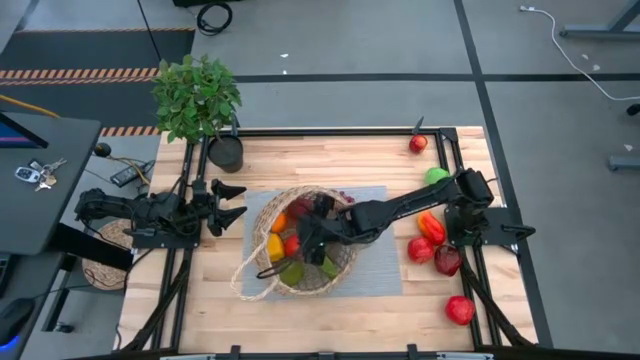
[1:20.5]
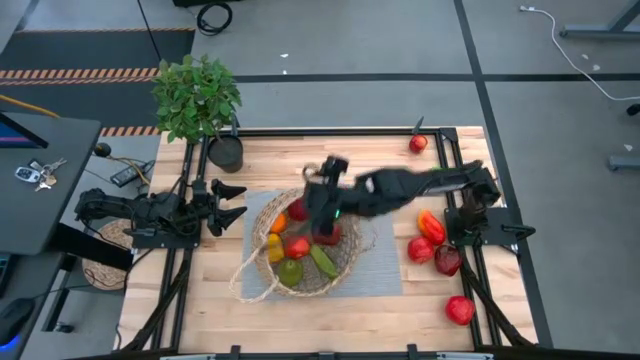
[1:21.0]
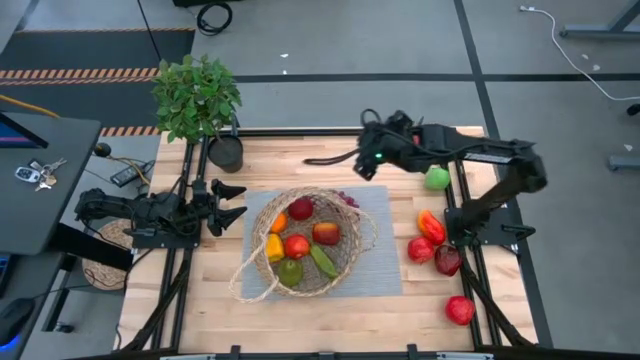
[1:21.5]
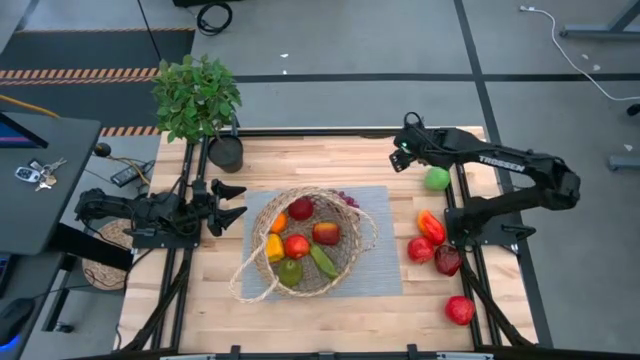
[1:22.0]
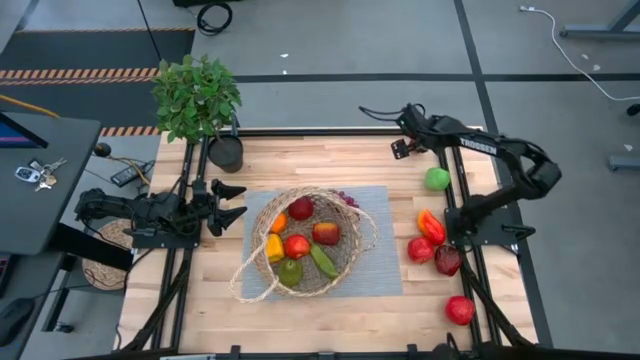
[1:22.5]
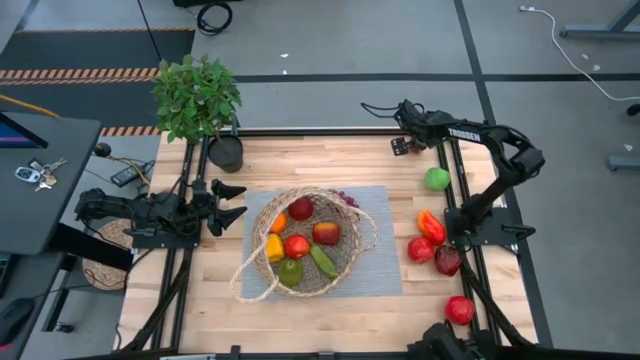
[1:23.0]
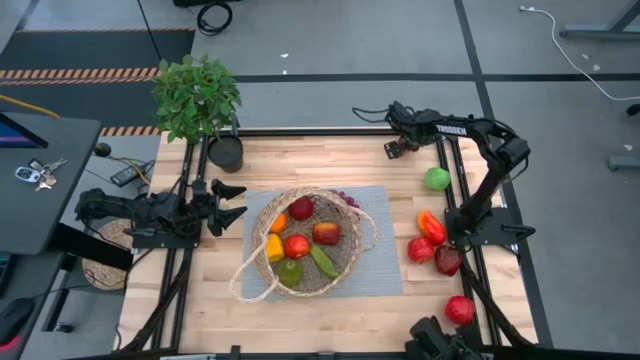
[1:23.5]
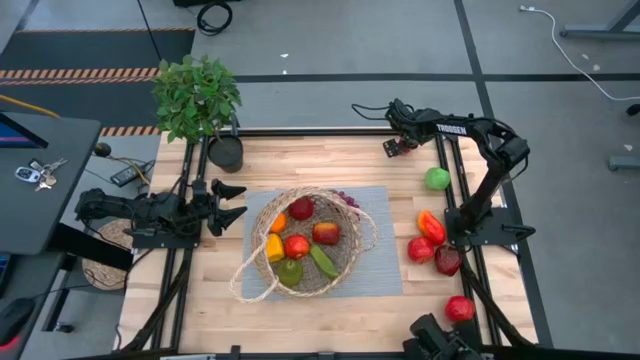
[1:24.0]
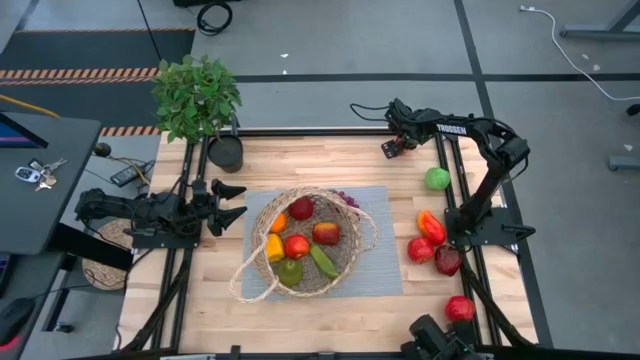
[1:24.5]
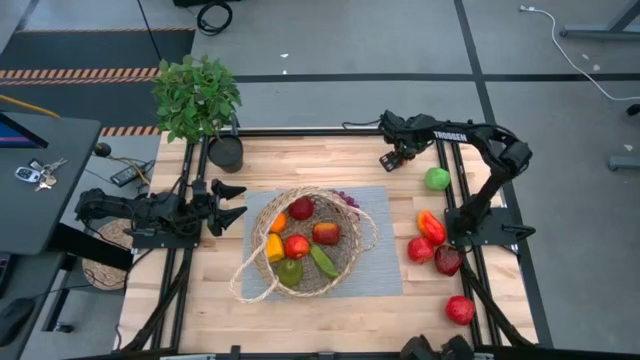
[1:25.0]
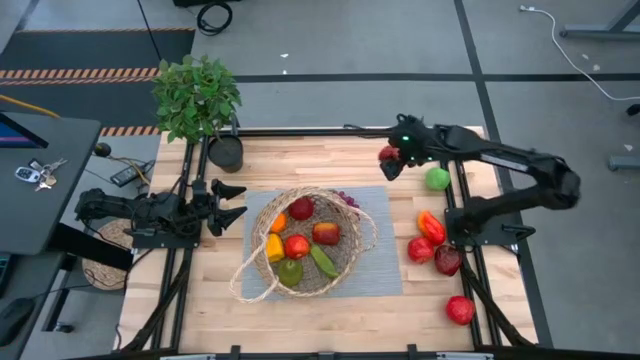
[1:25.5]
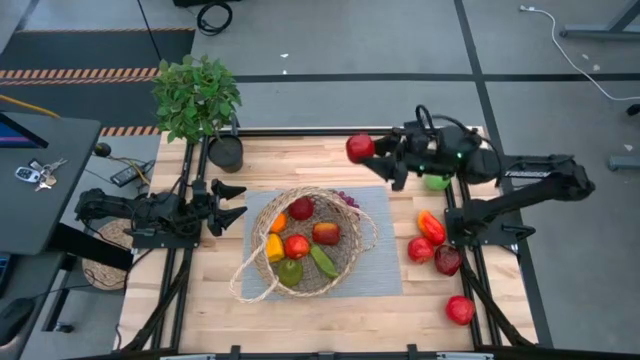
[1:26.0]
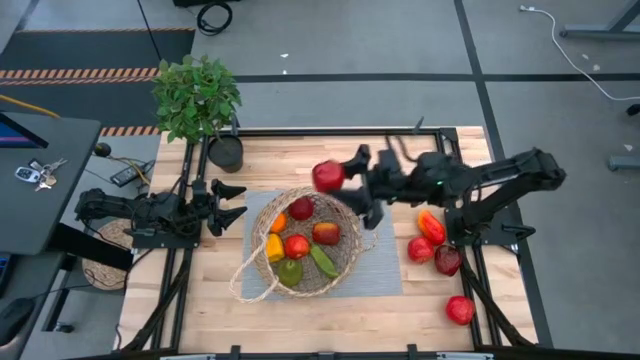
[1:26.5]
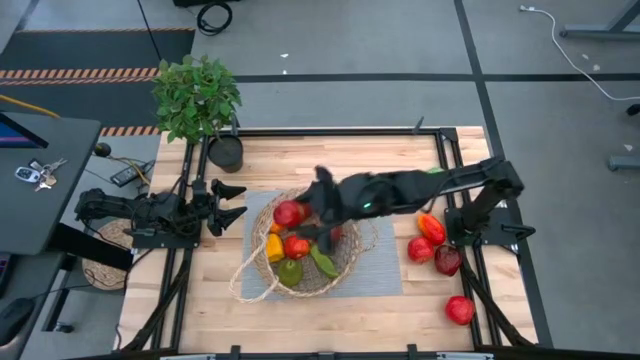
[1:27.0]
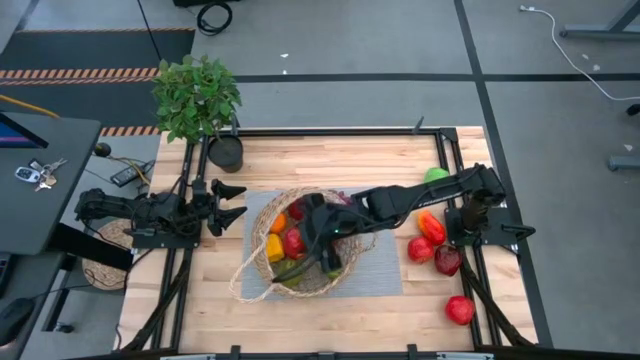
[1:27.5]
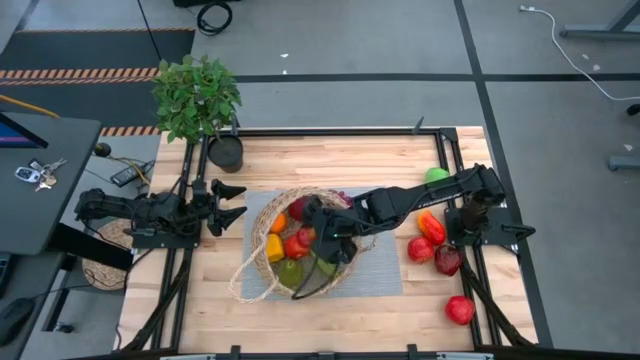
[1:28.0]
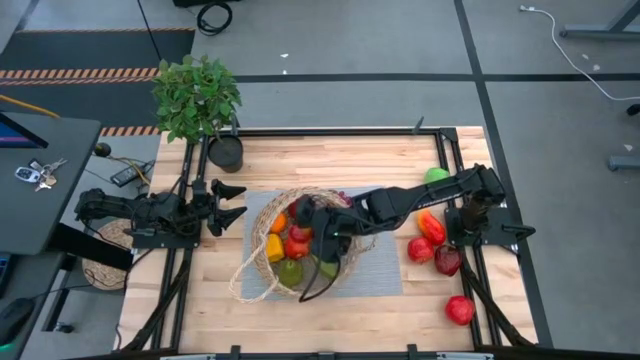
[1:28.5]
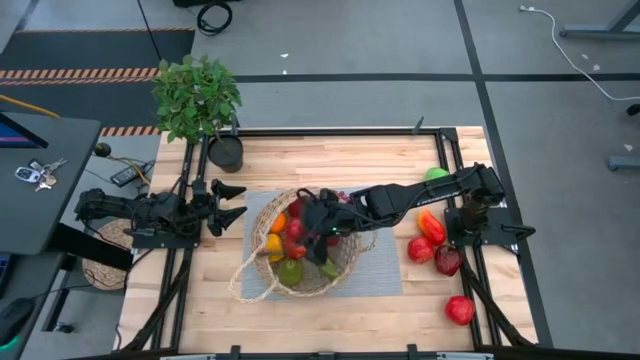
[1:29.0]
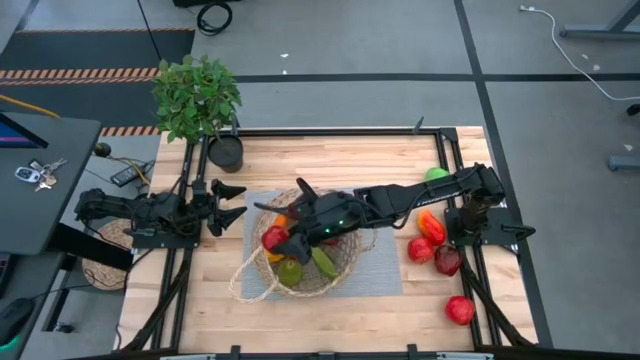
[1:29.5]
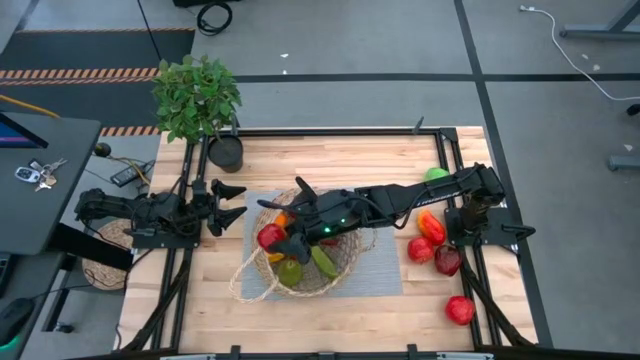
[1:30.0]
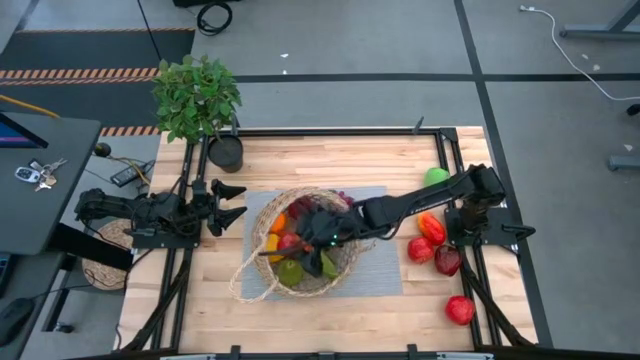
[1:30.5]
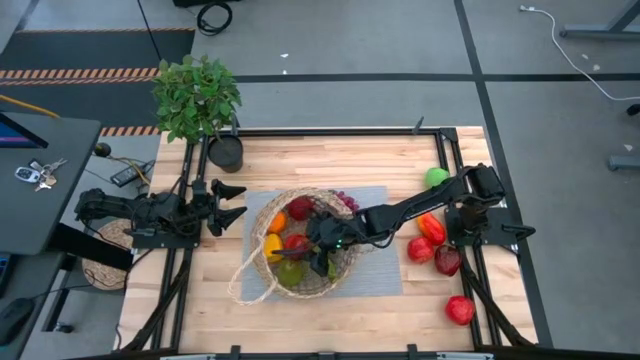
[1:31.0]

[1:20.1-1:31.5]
Task: Build produce basket
Put the dark red apple into the brown basket

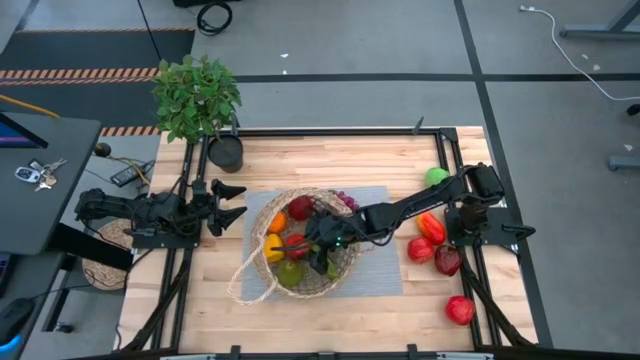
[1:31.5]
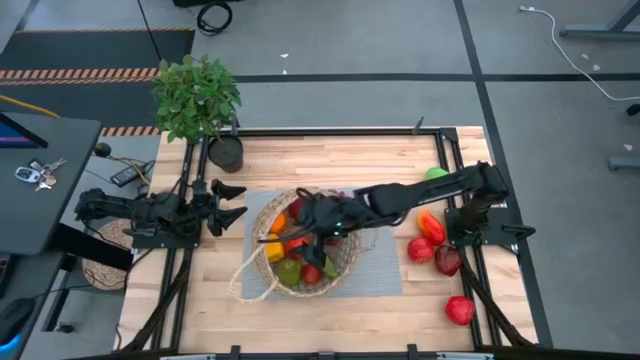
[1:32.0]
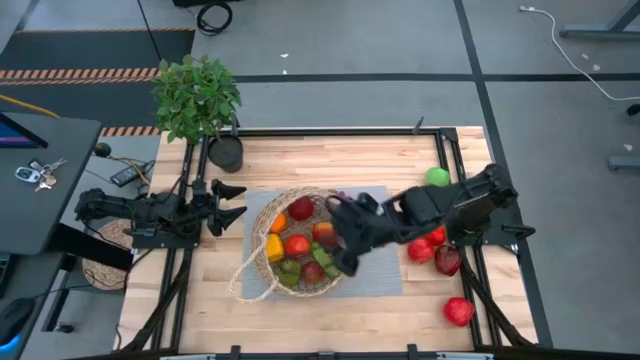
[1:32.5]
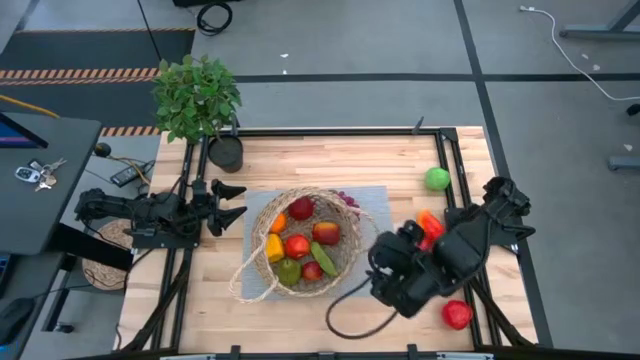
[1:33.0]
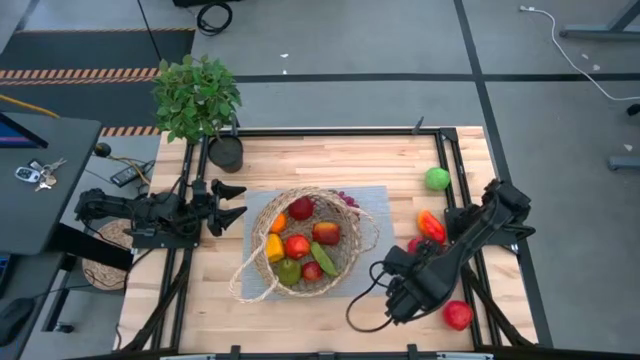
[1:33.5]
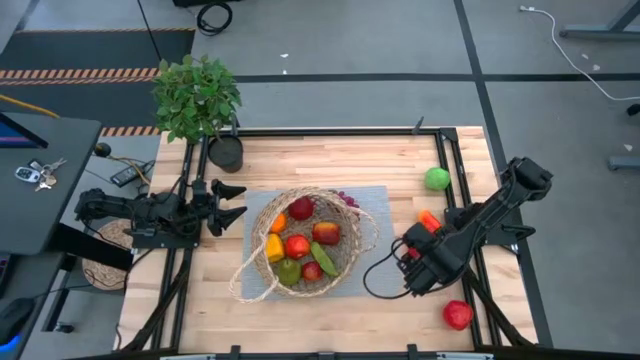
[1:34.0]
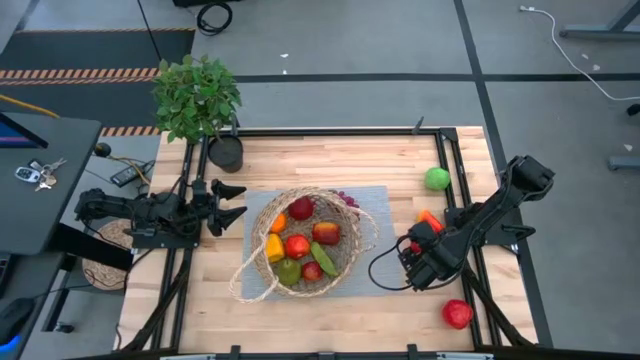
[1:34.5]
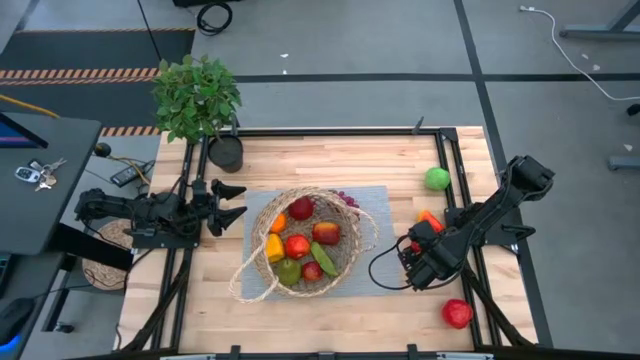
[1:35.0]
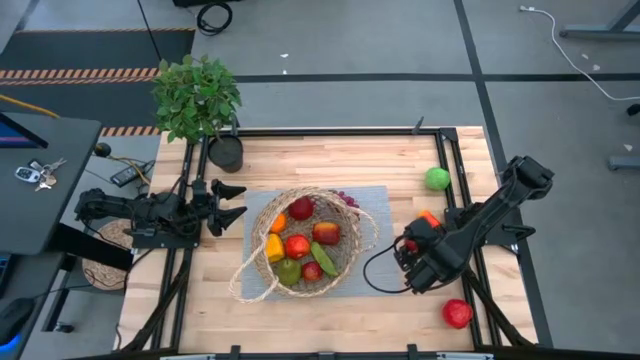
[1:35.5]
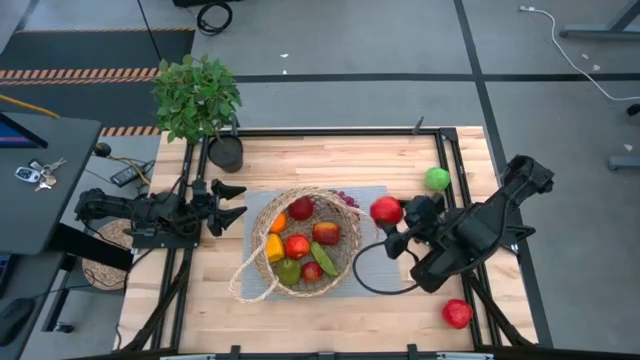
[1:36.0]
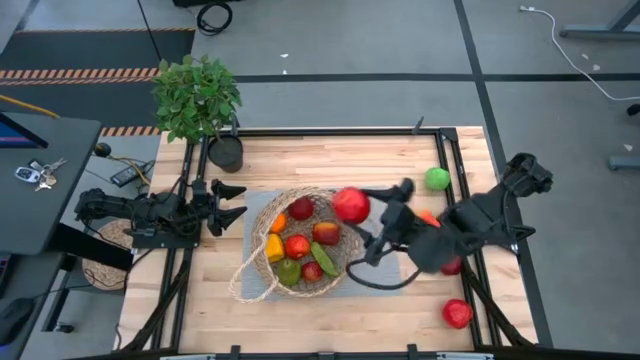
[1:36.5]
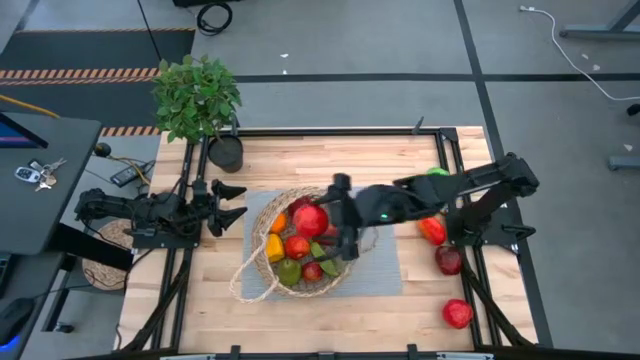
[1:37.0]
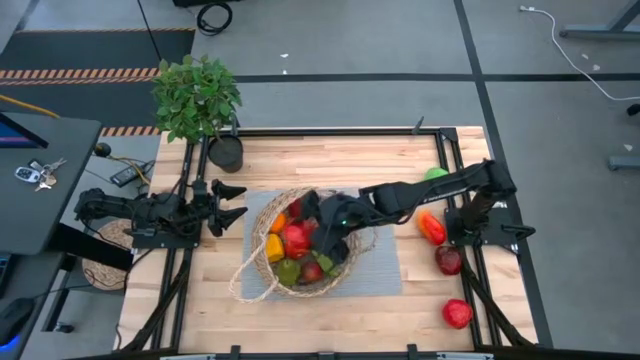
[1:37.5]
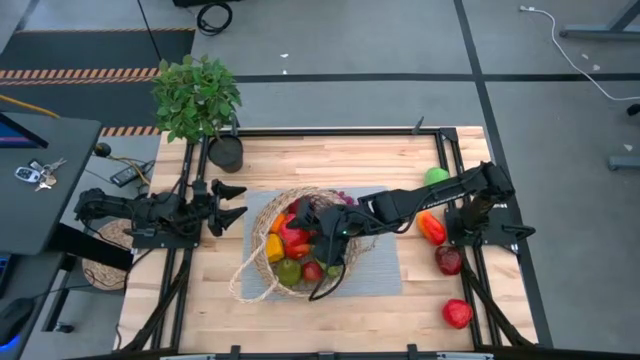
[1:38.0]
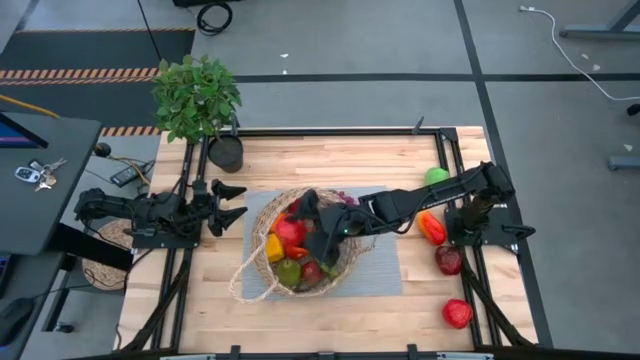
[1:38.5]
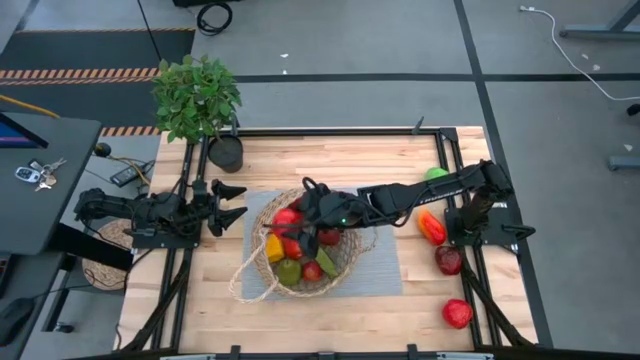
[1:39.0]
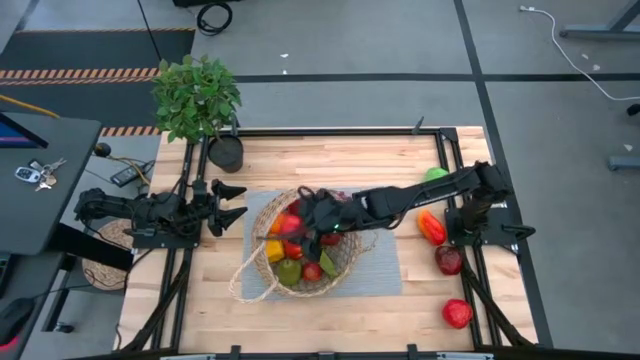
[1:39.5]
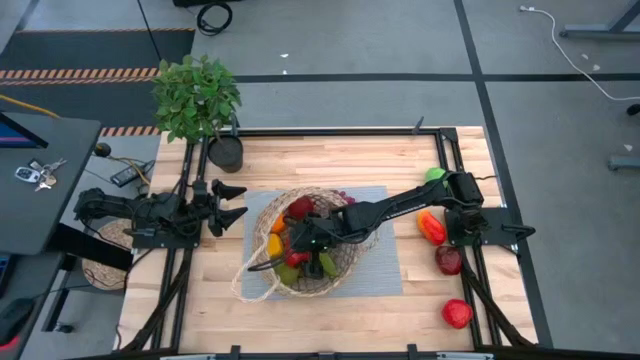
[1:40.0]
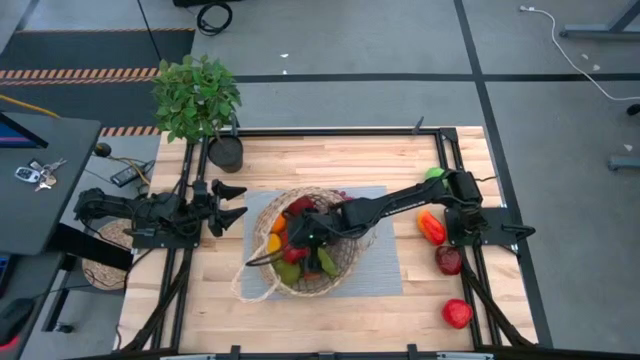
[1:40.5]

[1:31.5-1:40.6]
Put the red apple into the brown basket

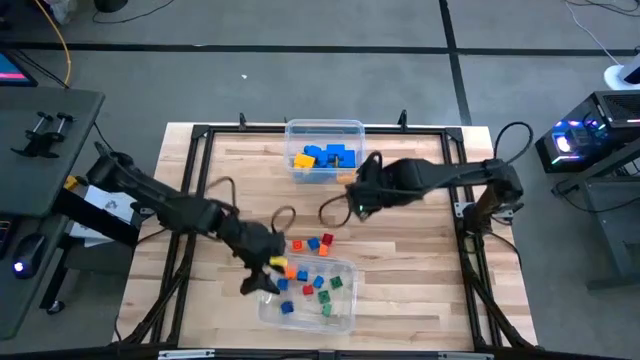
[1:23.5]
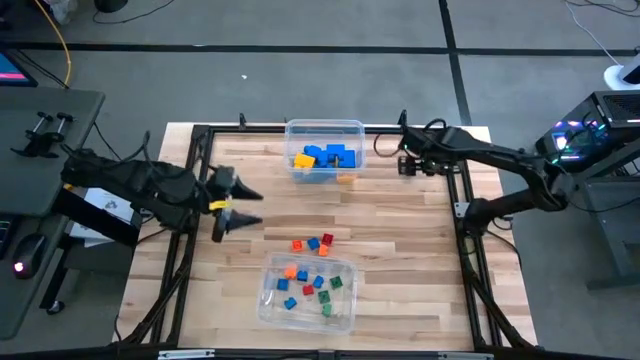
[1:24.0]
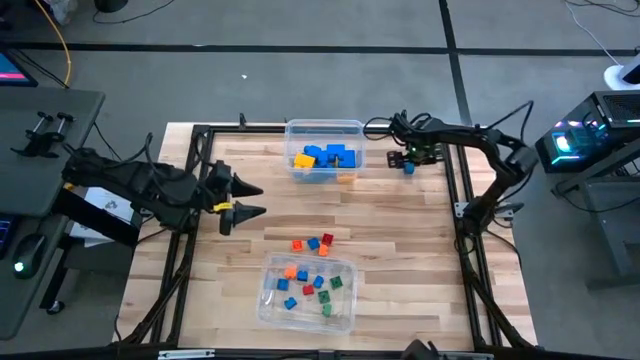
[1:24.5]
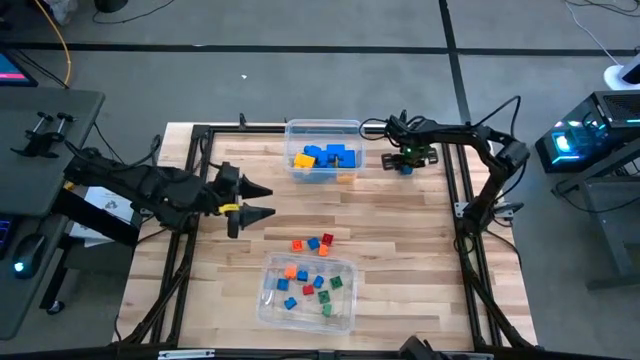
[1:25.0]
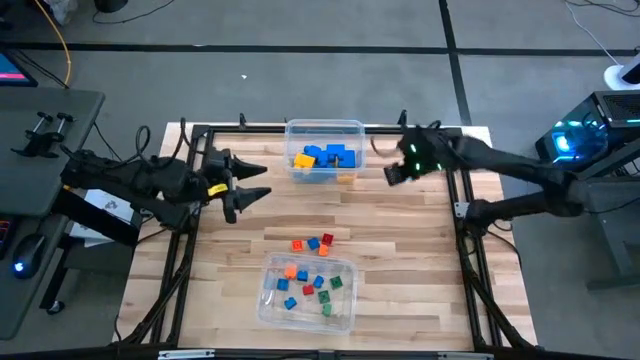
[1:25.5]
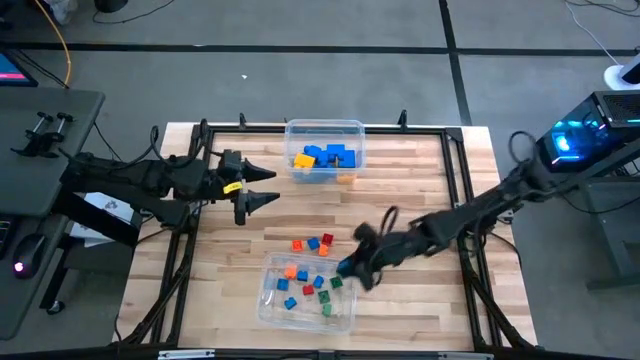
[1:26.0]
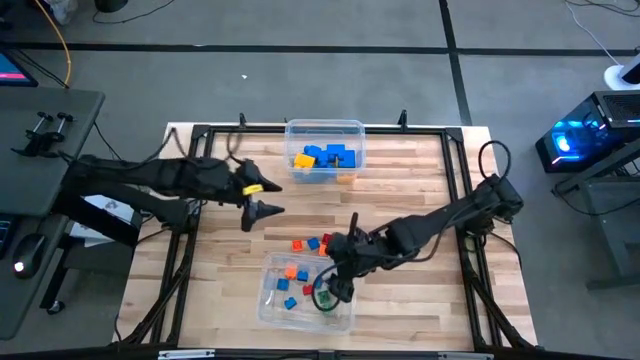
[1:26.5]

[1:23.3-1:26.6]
Task: Sort blocks by size
Put the small blue game piece into the bottom transparent bin
